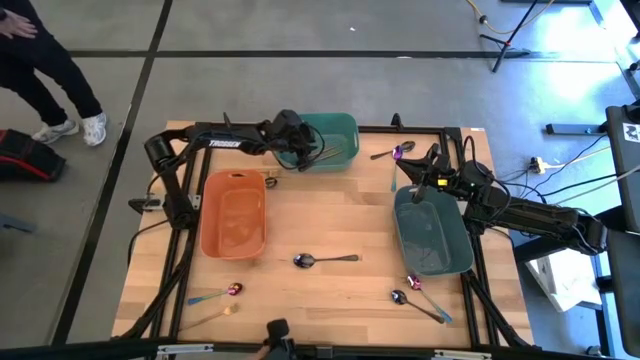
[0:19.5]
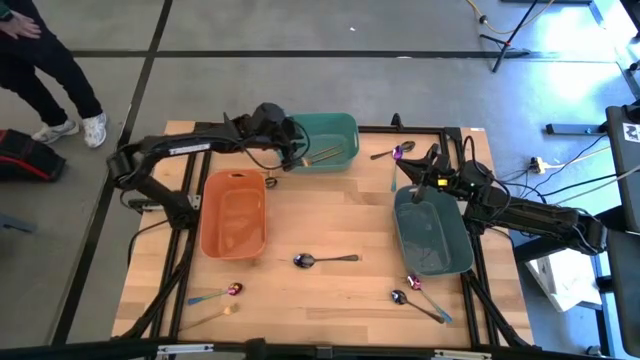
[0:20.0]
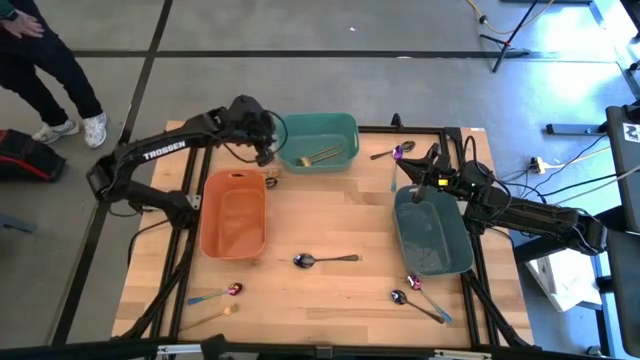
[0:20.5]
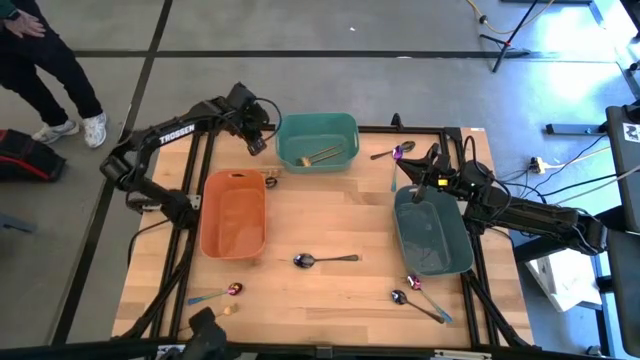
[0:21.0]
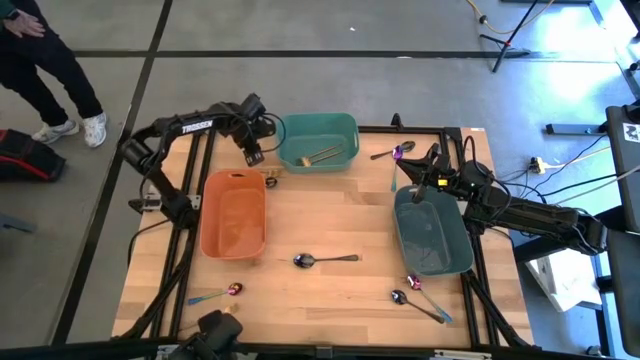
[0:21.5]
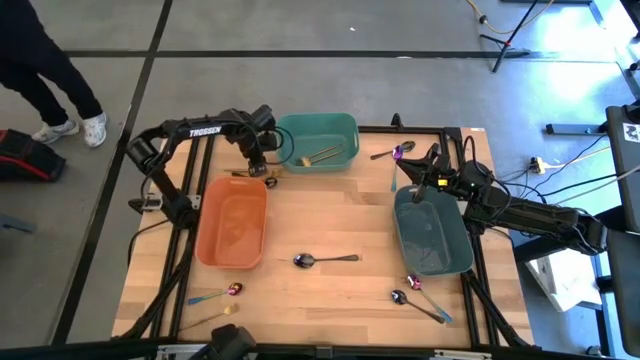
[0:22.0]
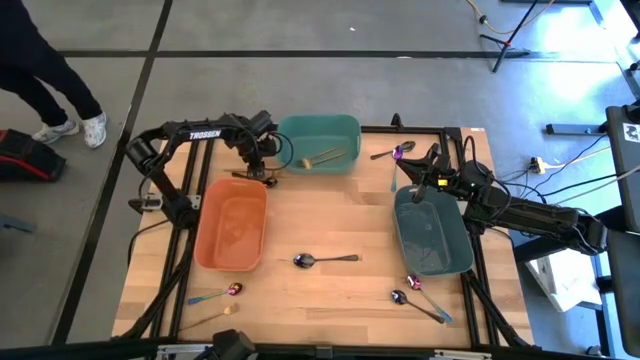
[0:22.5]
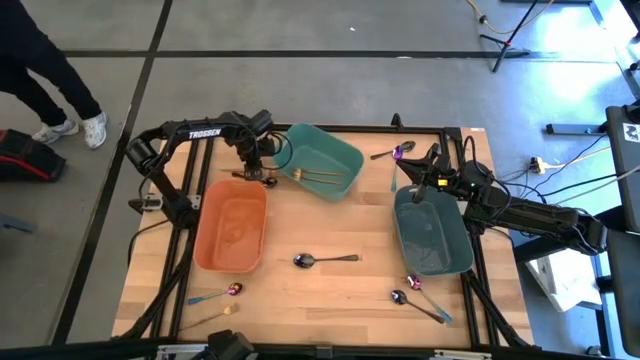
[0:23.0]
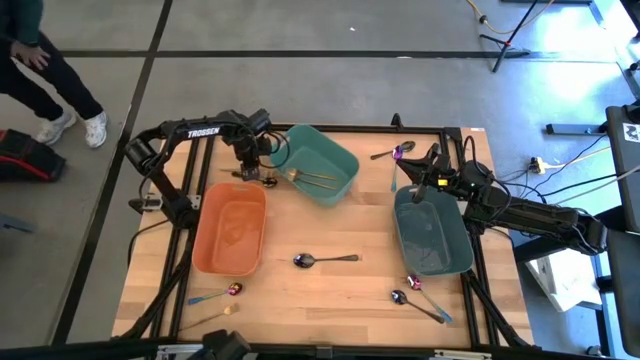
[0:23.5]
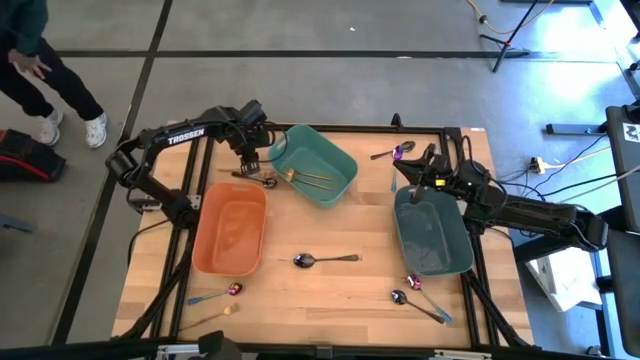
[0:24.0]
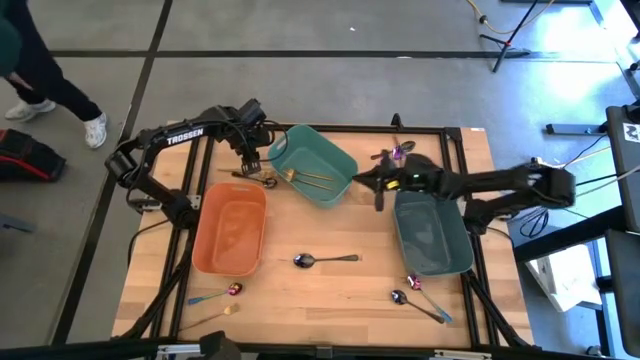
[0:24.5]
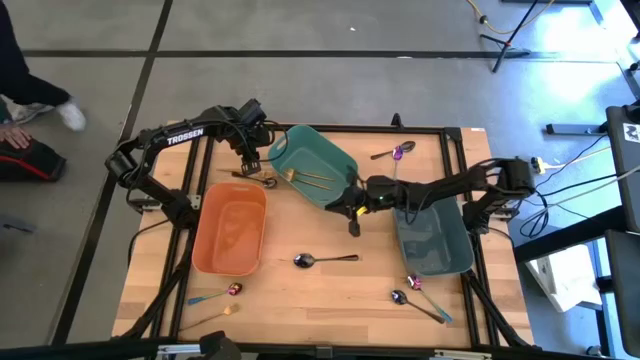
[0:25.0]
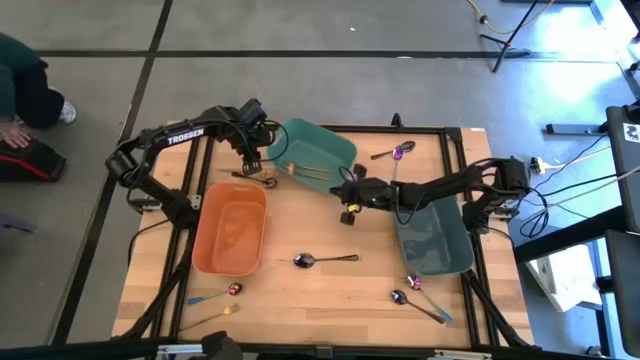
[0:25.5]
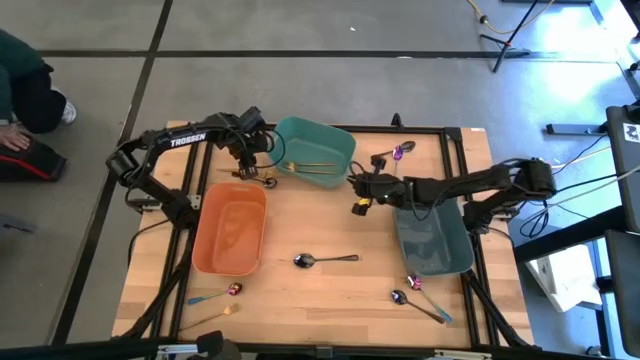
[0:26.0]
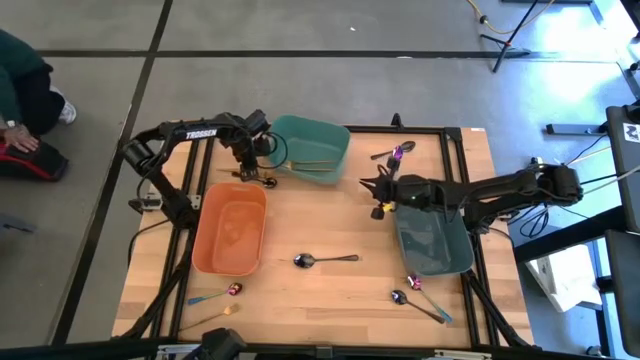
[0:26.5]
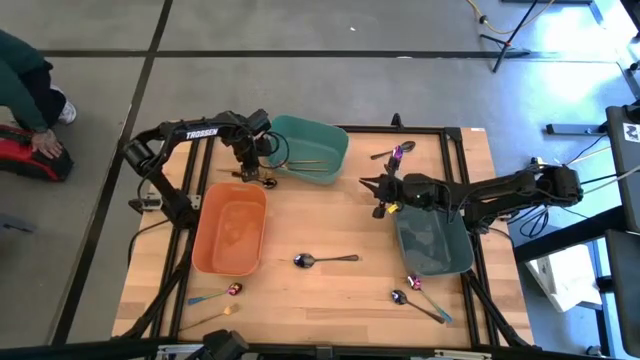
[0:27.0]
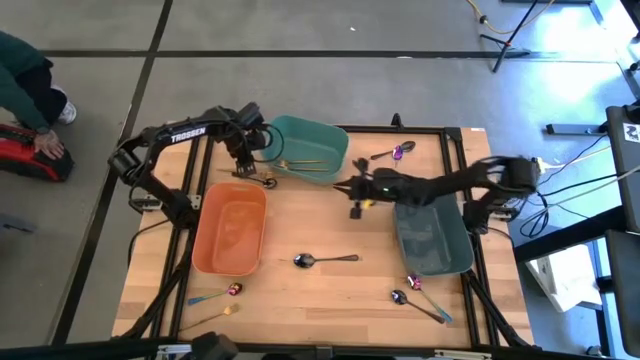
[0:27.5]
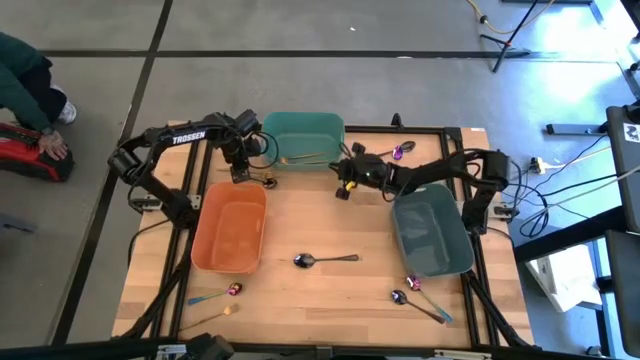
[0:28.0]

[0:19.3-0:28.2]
Task: Sort silverware by color (type)
Adjust the green bin

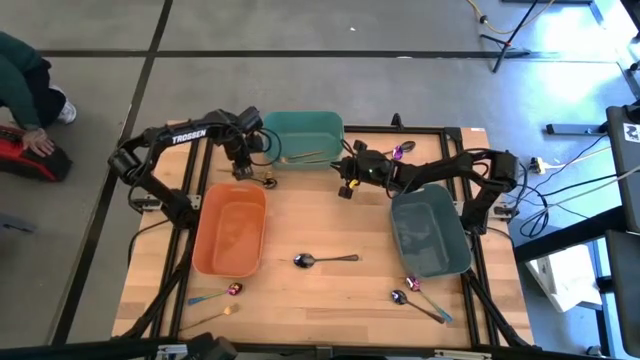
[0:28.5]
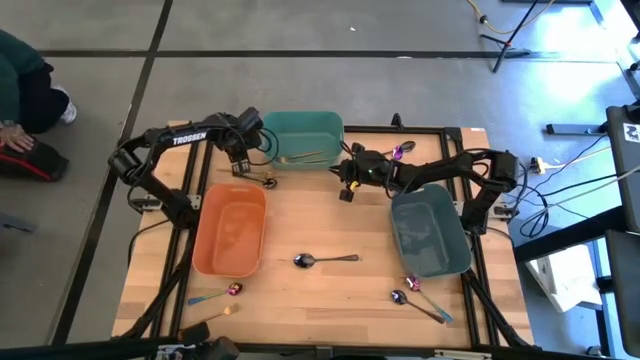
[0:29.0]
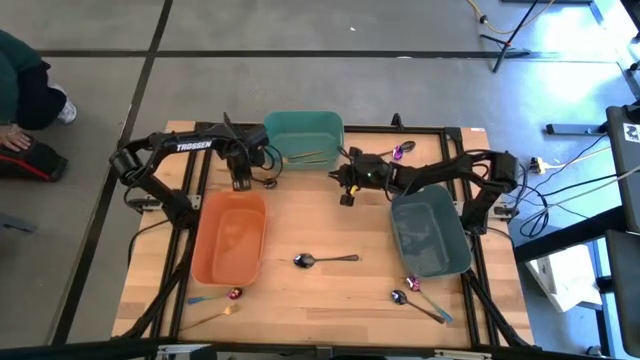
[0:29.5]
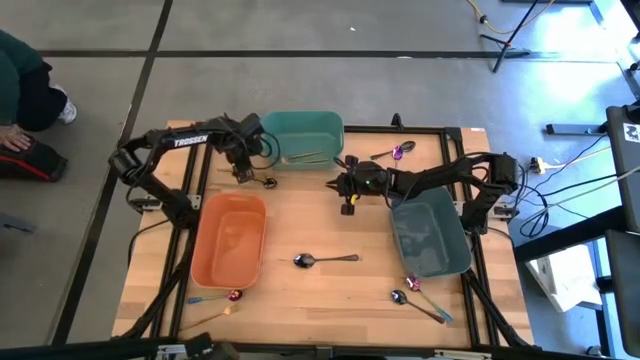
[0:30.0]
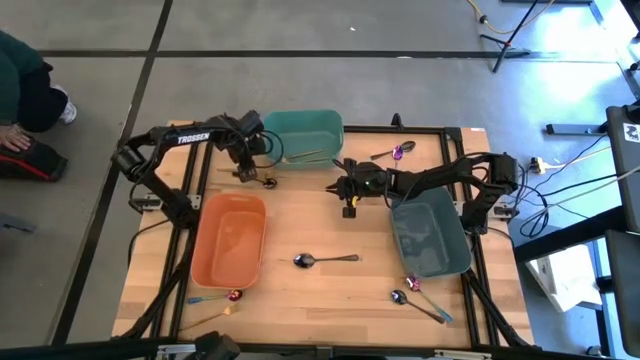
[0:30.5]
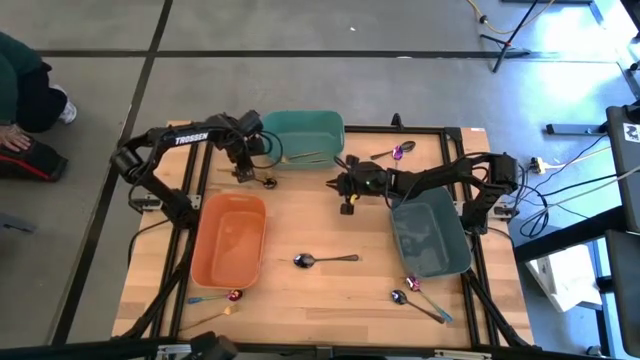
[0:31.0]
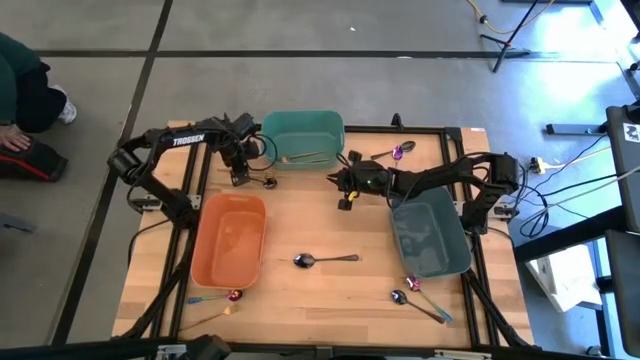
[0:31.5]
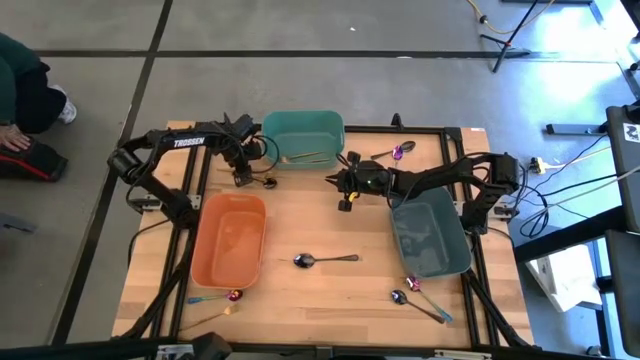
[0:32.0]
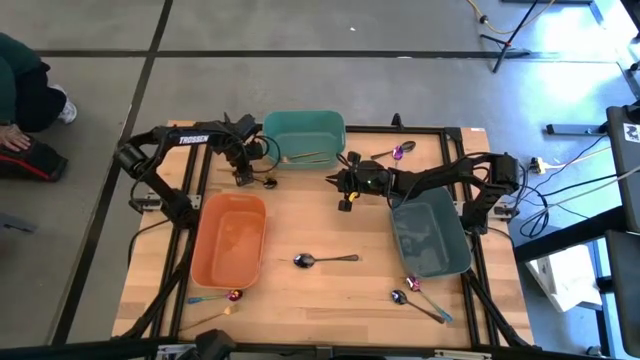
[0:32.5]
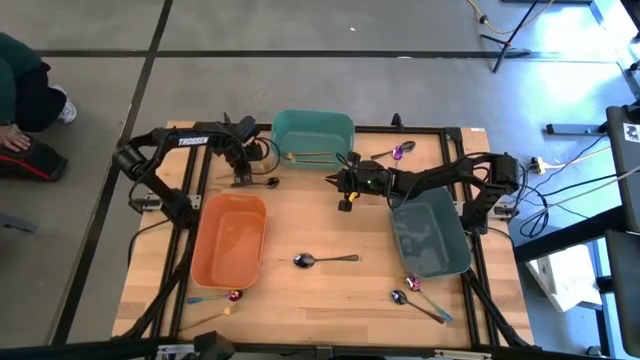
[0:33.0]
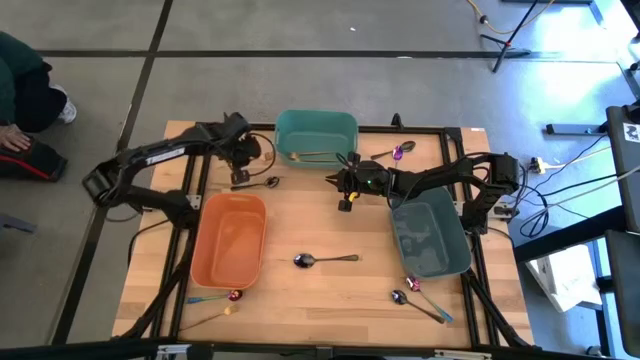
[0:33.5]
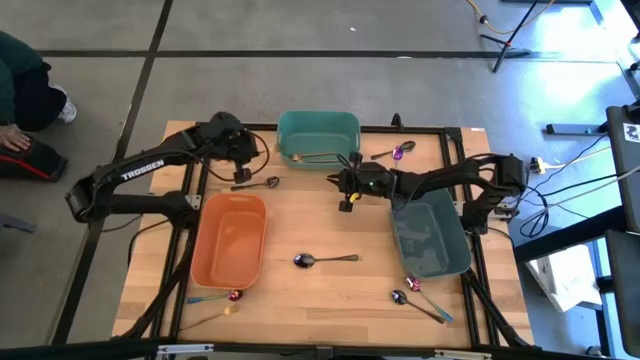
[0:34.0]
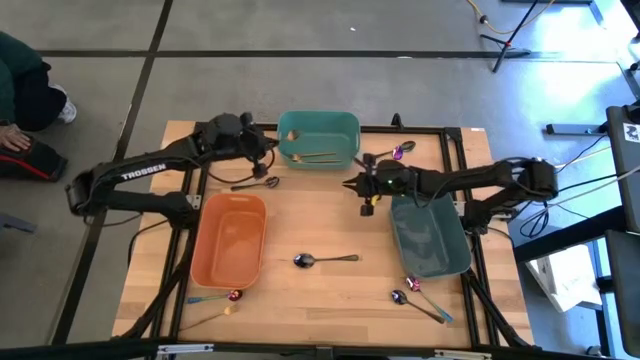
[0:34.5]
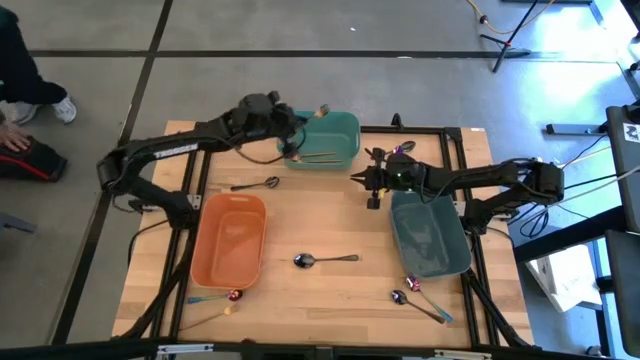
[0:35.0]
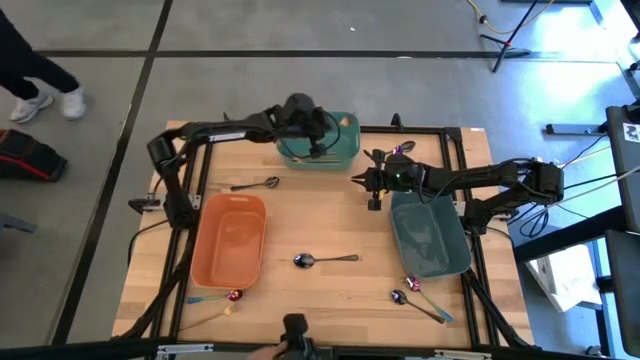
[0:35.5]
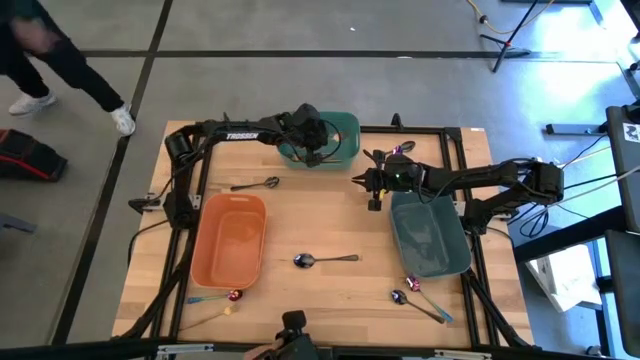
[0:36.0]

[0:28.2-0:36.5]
Put the gold fork into the green bin

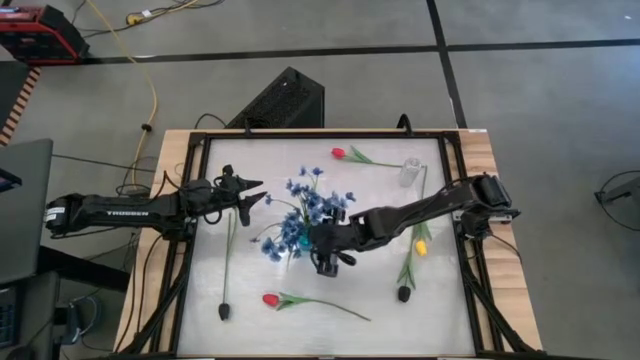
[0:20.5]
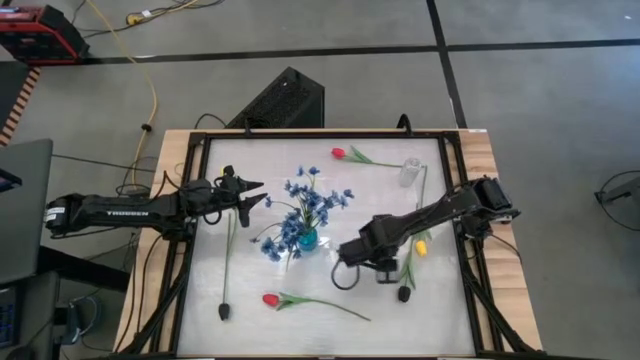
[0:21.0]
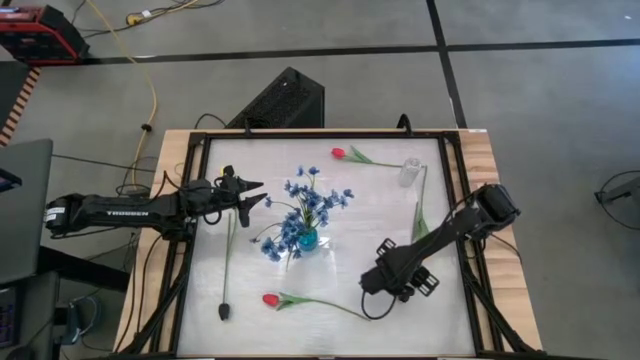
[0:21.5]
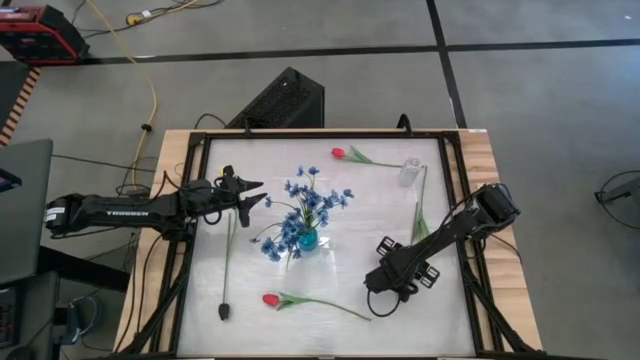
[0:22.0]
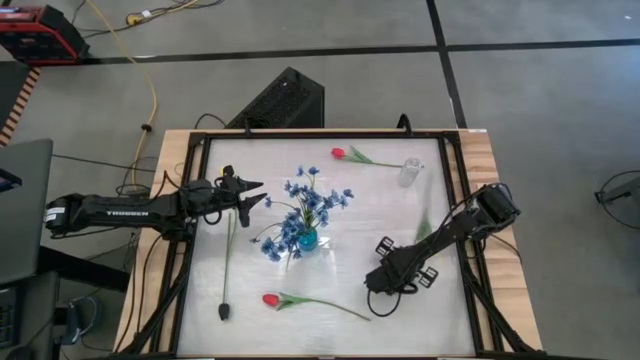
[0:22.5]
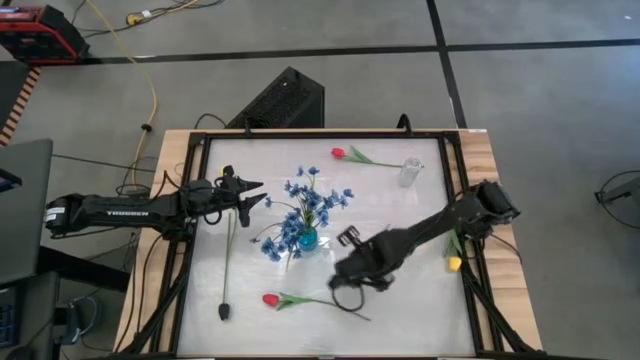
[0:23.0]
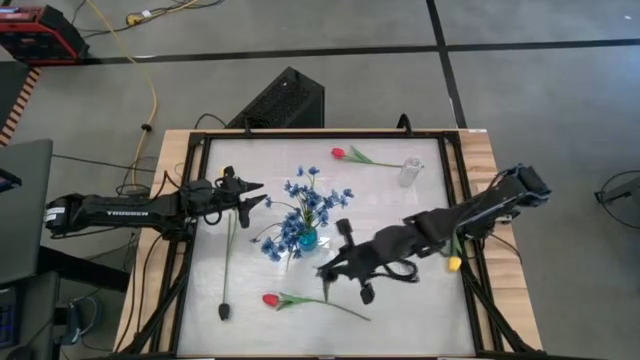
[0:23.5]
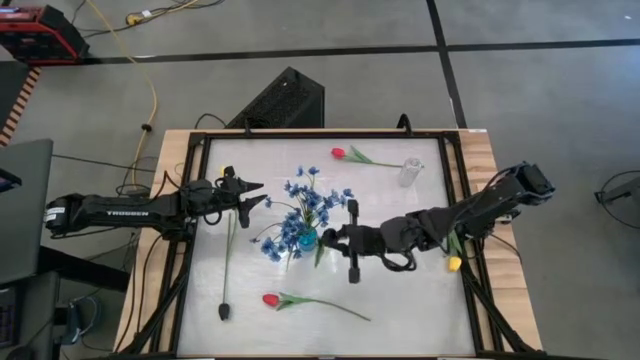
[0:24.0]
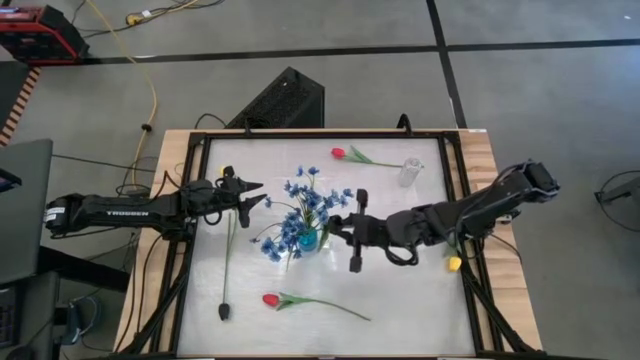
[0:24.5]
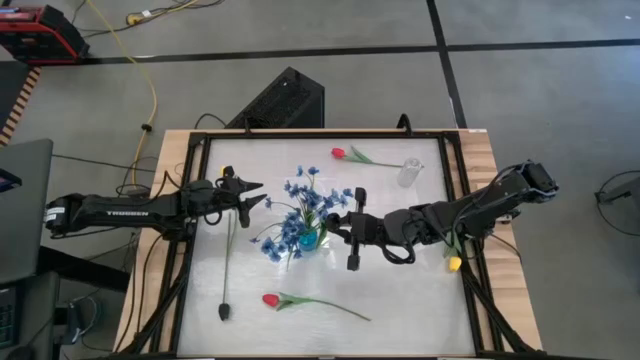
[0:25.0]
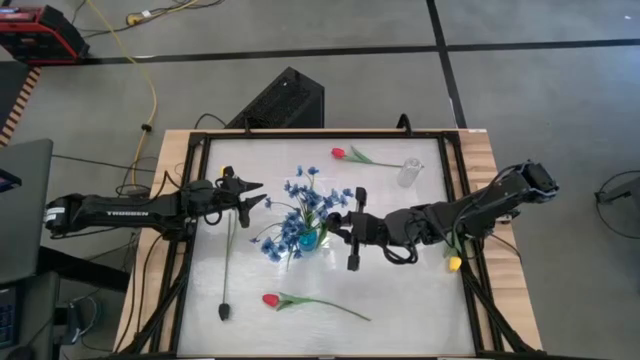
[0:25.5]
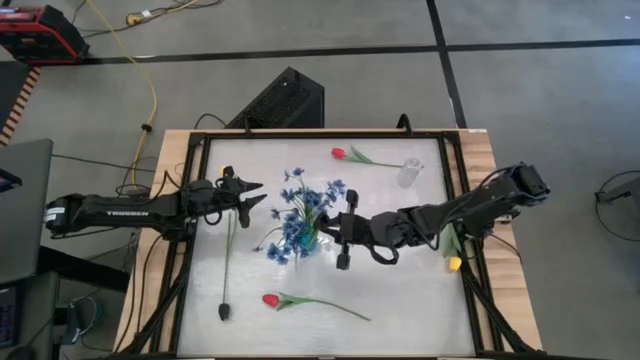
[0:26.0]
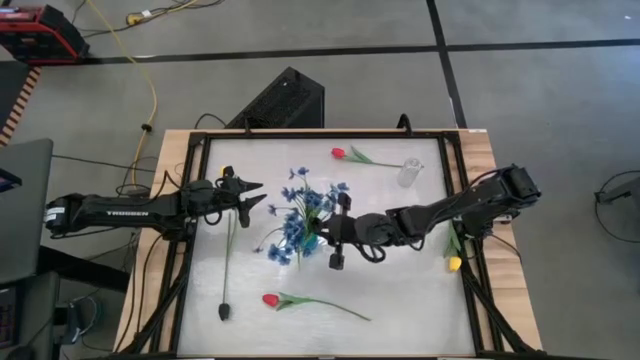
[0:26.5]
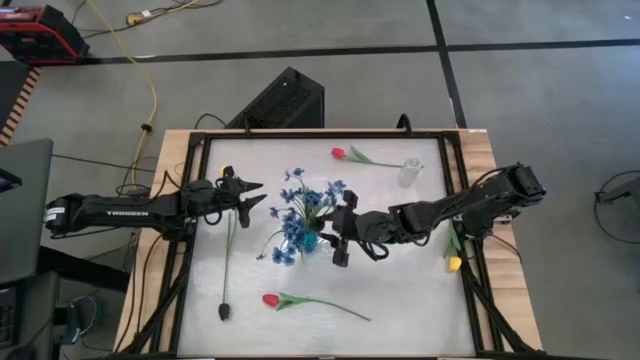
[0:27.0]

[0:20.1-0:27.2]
Task: Sort flowers into vase by color
Put the right black tulip into the blue vase
